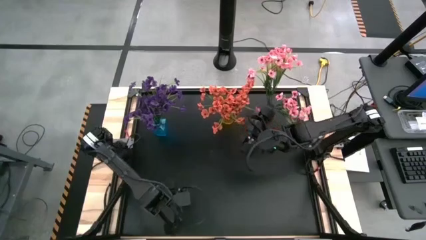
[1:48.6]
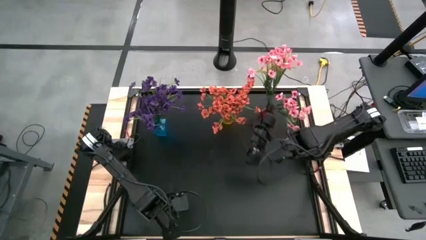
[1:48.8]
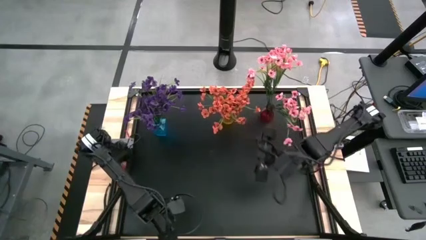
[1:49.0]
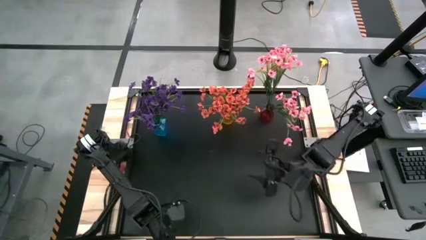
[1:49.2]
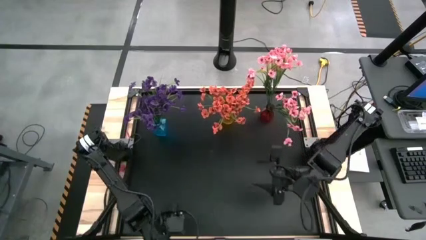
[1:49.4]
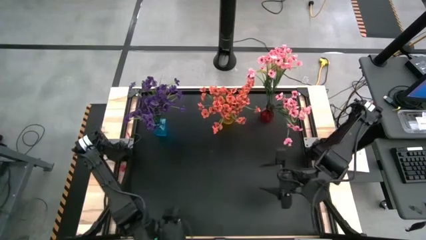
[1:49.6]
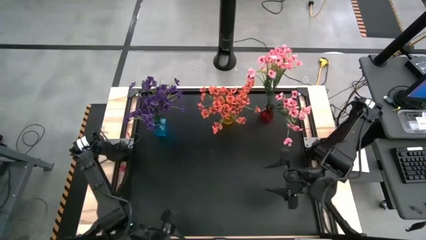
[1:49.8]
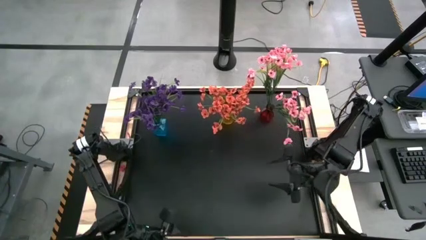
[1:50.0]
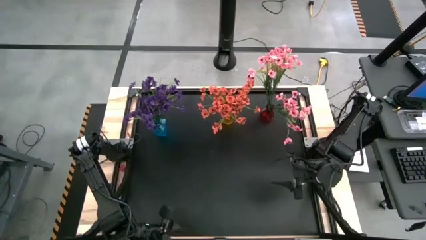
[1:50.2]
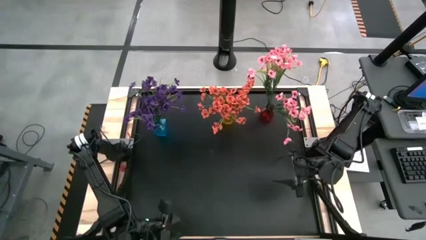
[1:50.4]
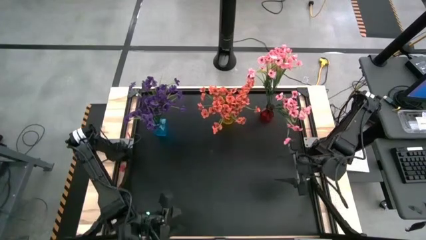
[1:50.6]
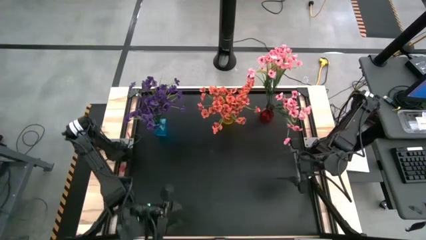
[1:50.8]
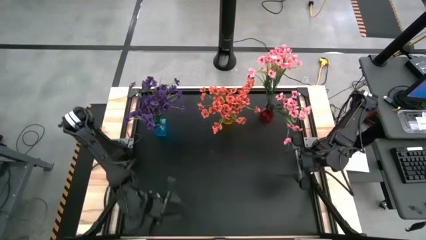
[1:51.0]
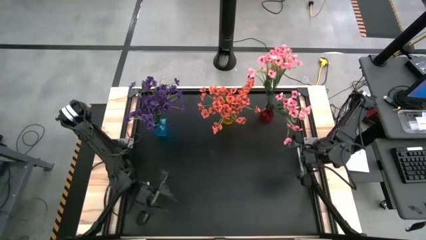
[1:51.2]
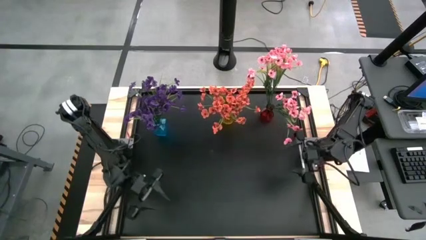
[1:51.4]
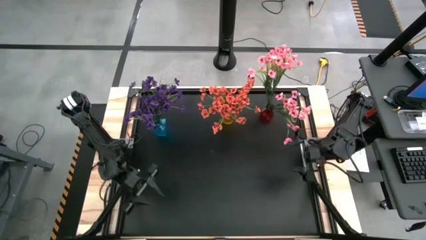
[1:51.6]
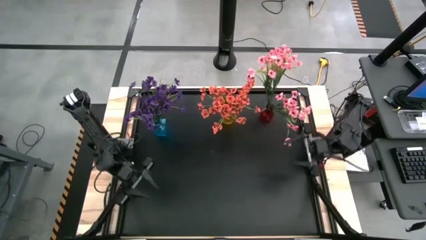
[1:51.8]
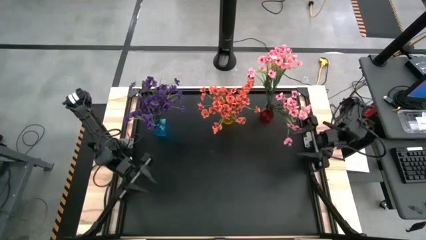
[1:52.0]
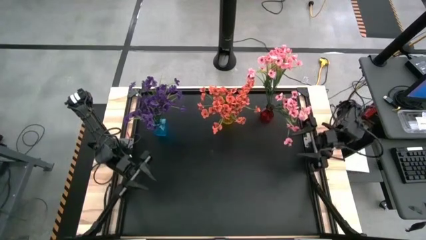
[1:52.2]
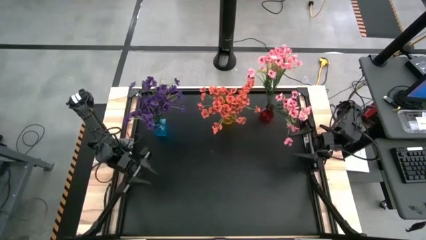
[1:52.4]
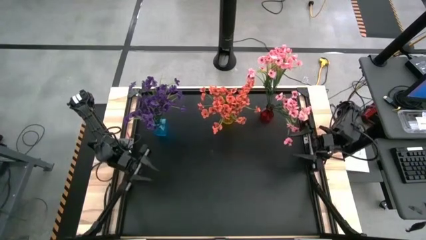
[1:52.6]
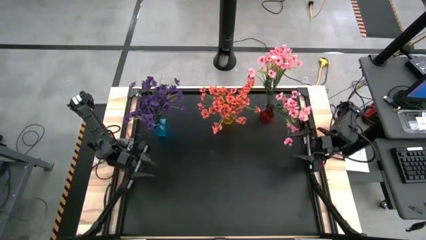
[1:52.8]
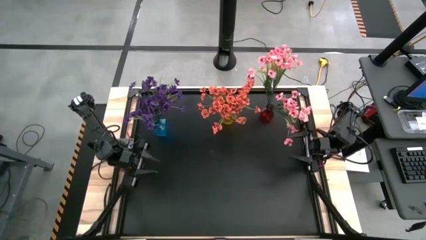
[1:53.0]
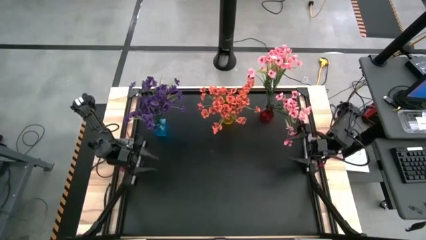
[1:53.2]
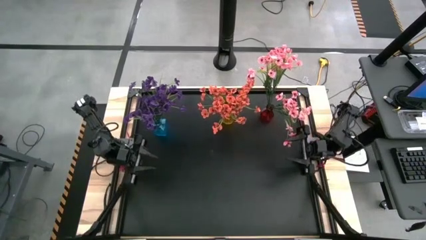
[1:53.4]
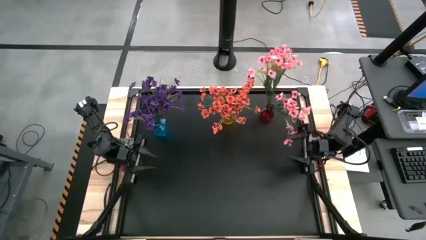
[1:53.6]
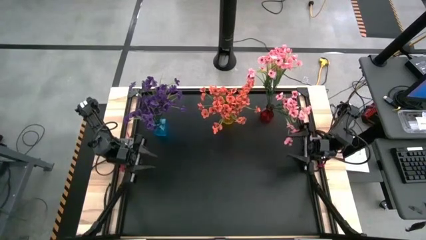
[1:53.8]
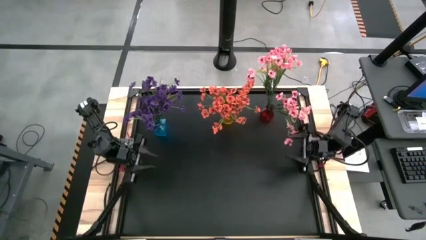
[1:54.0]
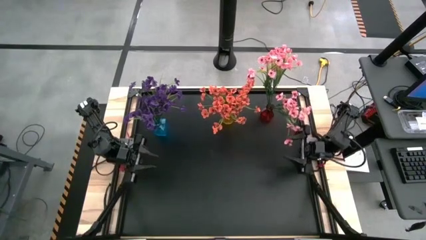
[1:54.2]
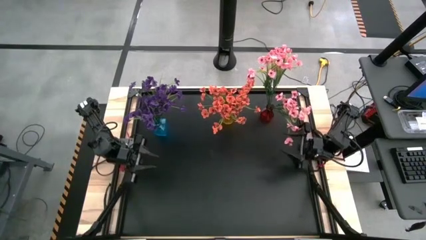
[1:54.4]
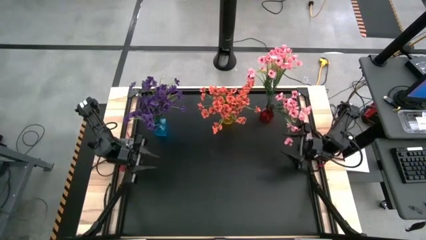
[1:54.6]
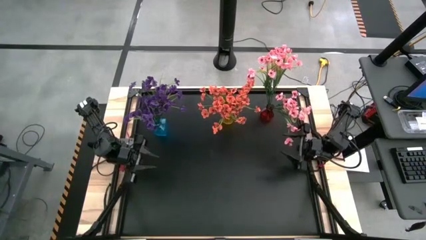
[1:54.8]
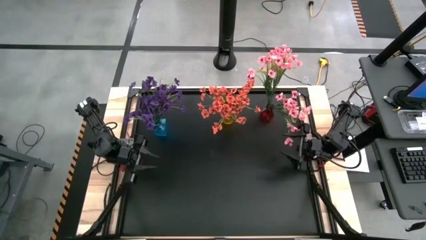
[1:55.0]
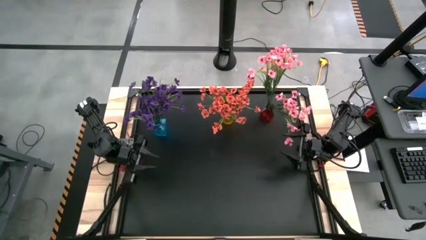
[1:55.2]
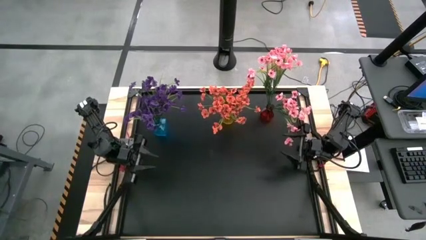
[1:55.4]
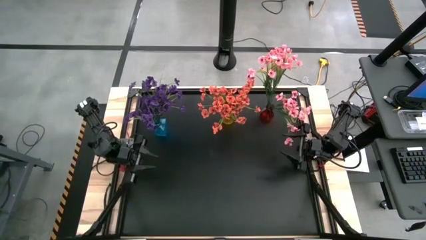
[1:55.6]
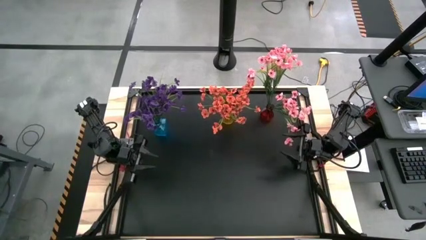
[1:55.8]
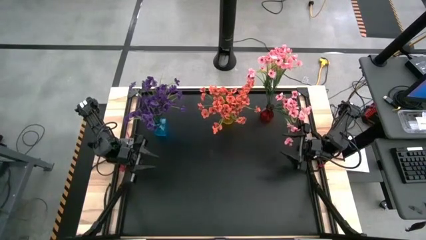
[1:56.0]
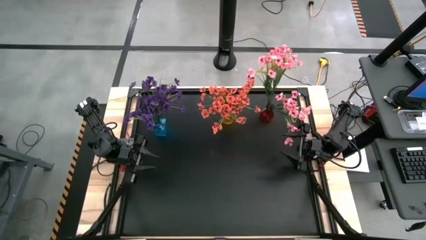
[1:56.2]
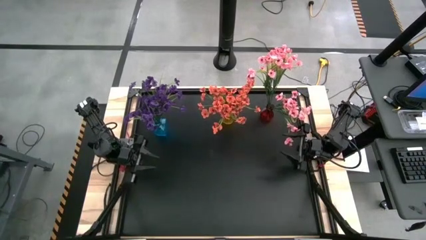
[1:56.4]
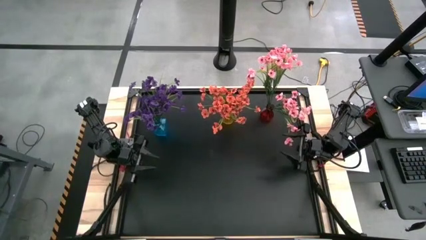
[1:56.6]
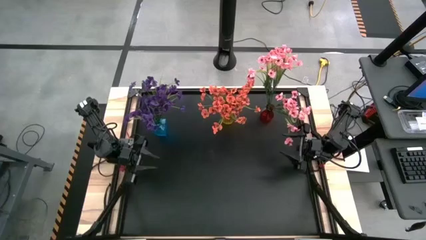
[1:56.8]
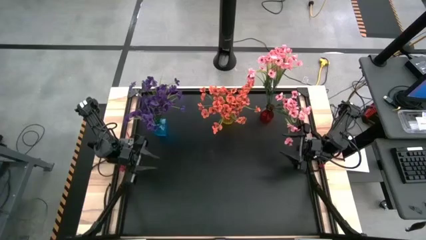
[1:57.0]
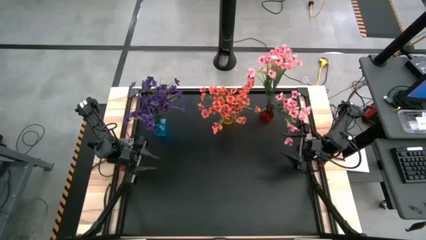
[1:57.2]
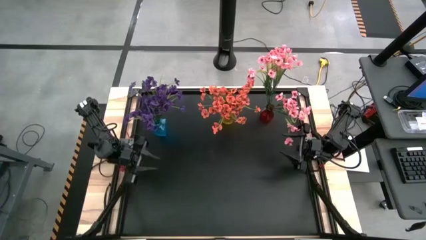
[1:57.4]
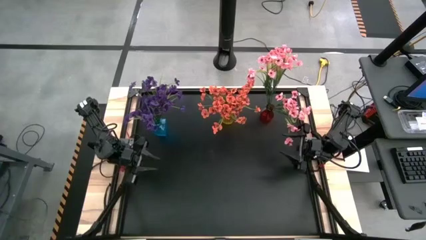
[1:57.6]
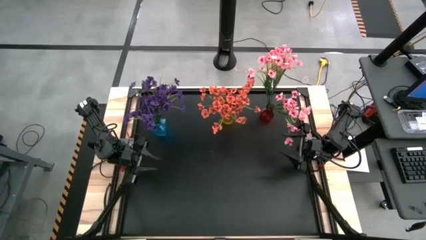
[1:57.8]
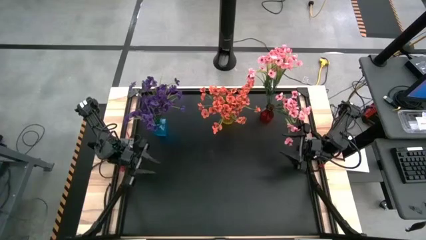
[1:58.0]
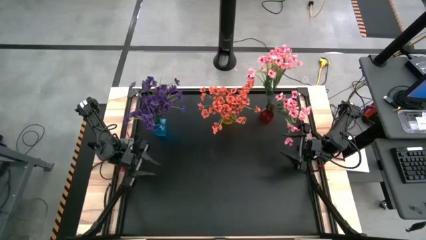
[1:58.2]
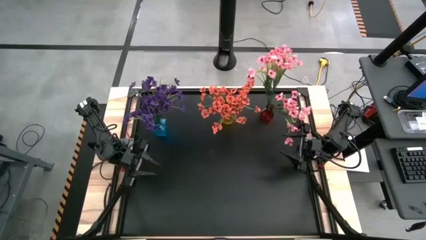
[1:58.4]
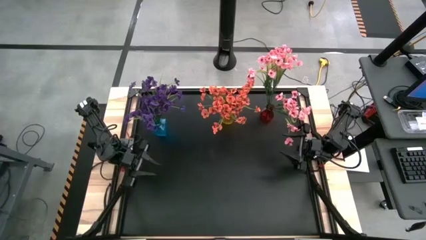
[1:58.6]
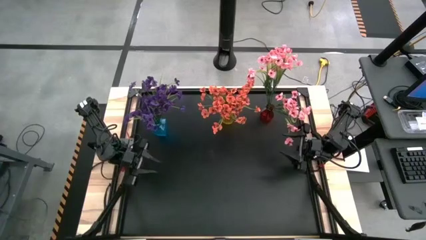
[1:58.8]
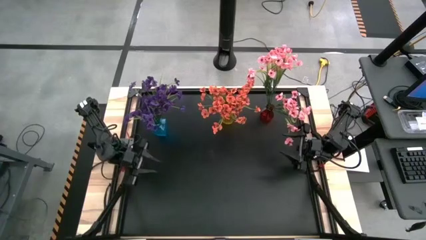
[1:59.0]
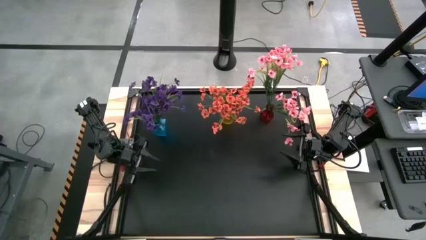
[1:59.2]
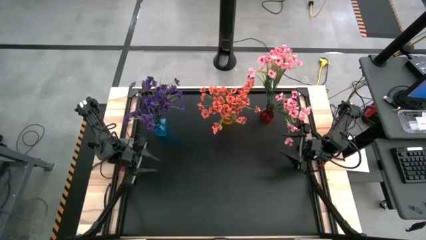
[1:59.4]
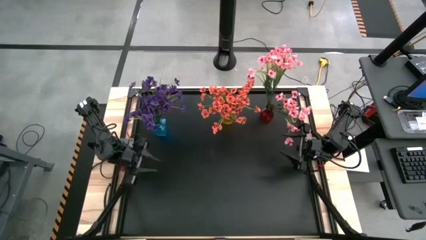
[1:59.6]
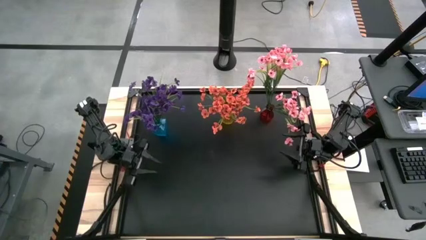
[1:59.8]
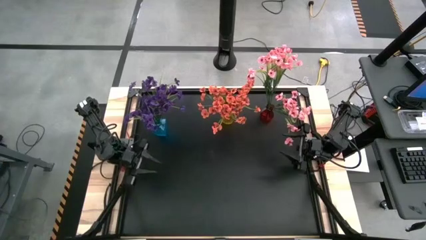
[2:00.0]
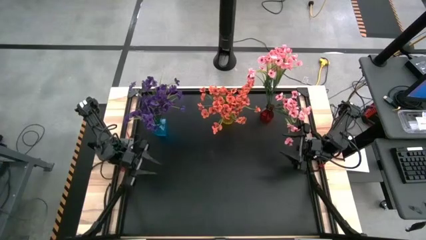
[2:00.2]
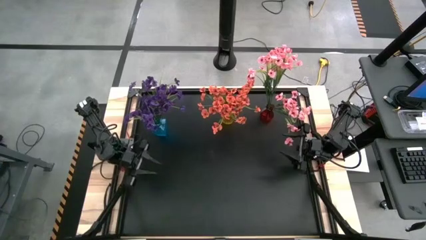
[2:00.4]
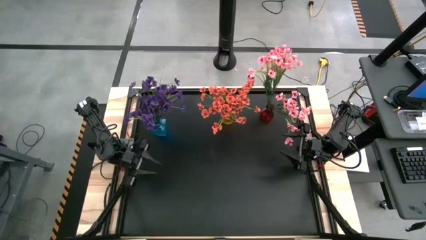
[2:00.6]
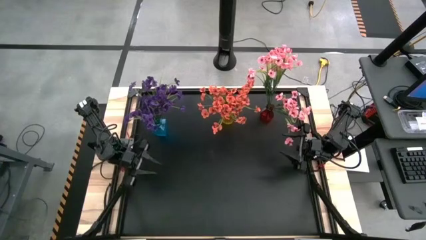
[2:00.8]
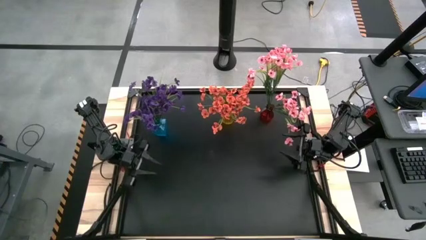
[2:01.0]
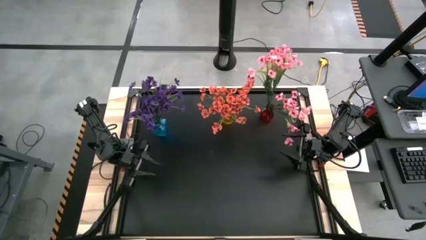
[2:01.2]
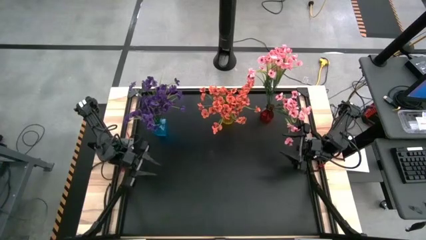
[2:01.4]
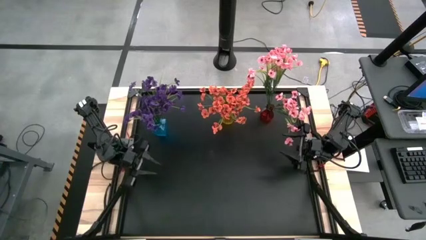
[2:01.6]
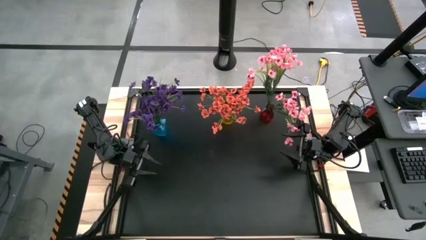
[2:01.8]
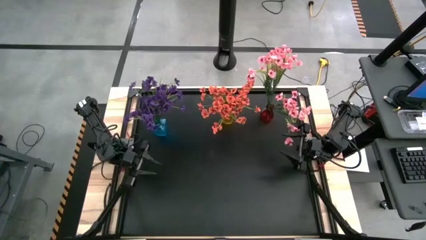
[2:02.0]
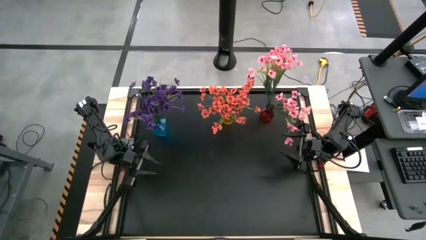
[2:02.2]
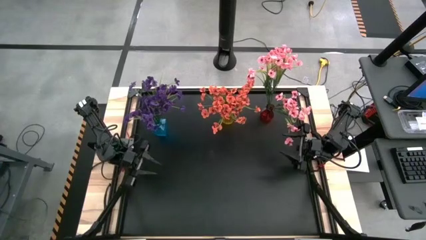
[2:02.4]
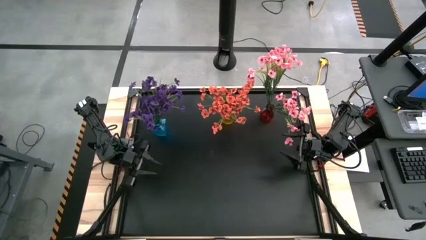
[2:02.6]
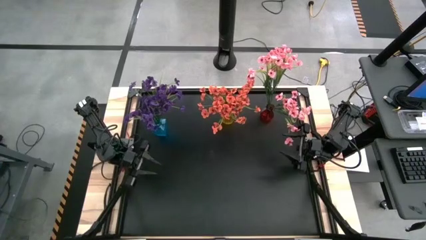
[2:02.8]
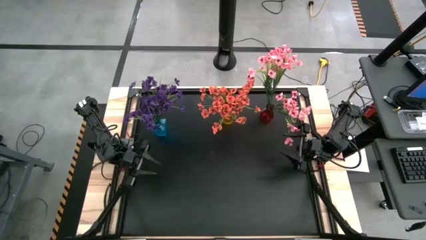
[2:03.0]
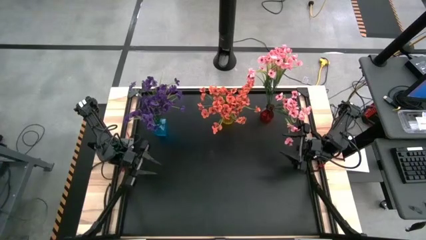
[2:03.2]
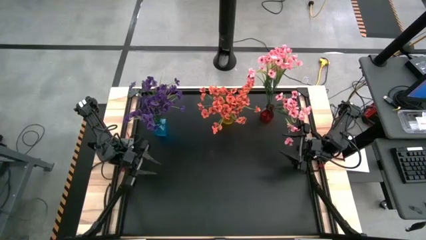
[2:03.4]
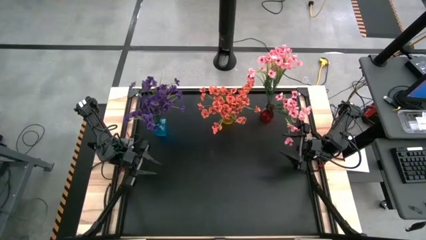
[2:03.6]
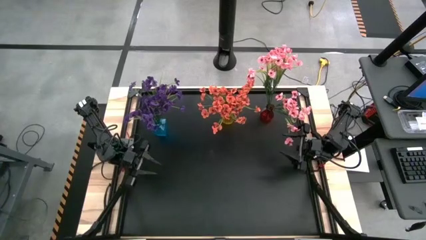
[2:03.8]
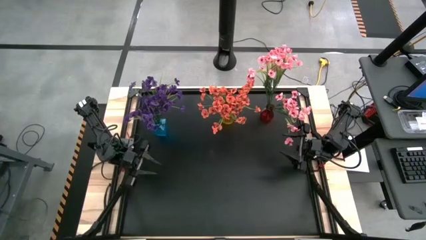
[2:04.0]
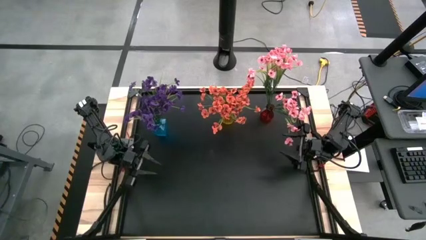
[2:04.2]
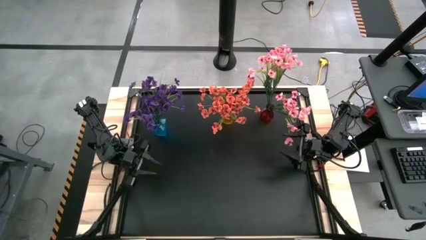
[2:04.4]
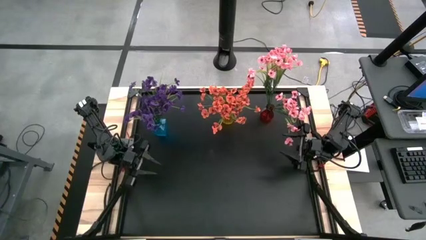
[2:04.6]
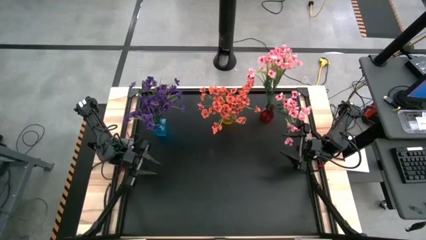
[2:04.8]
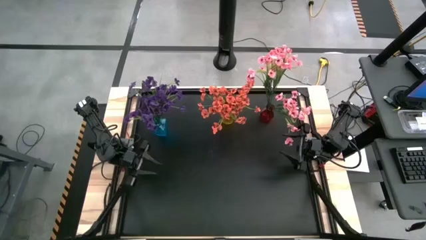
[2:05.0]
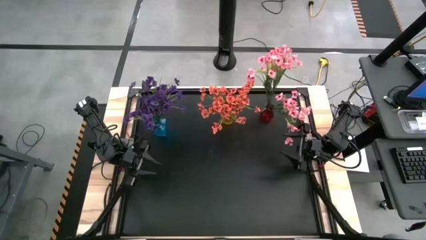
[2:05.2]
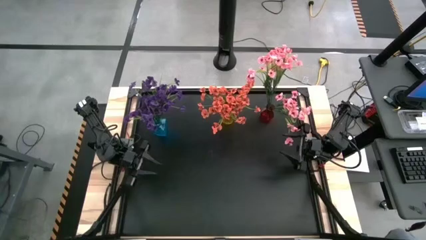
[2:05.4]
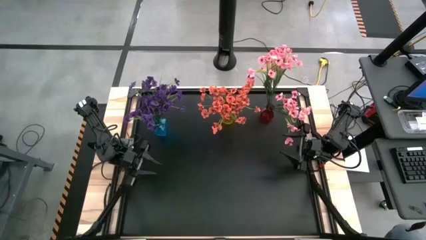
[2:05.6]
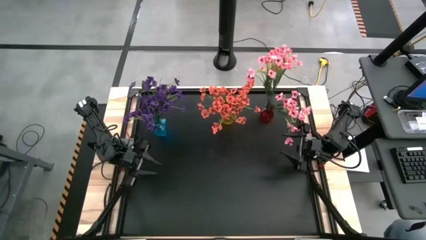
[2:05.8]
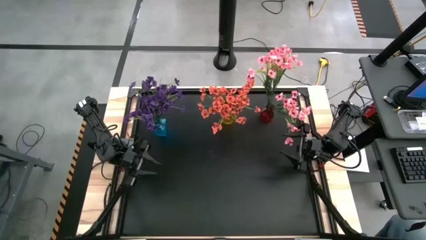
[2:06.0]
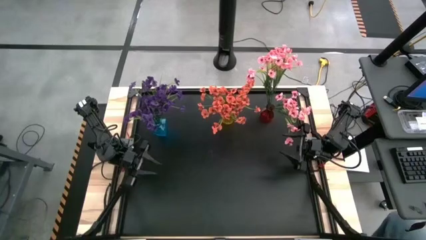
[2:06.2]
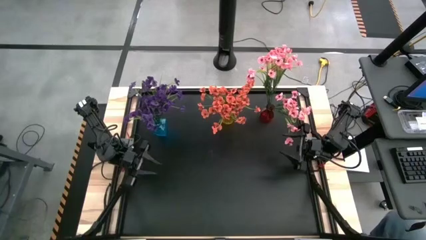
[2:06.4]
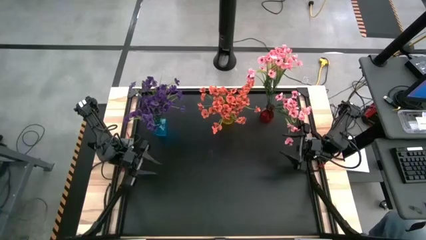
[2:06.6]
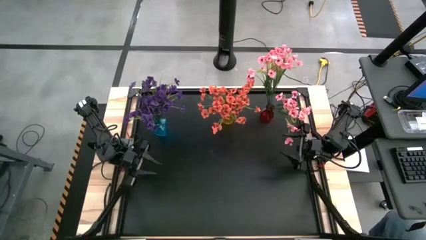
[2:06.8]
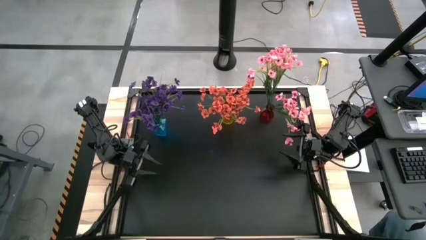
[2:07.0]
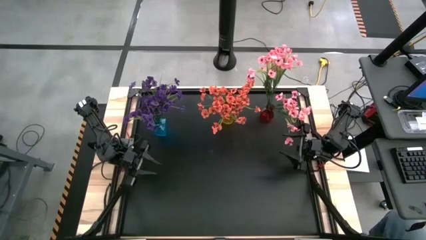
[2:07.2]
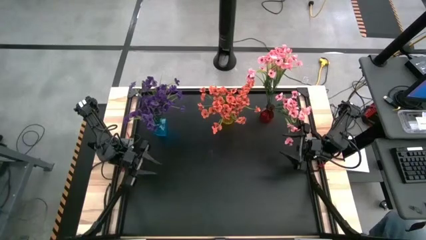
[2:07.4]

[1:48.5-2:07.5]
Task: Sort flowers into vase by color
Return to Home Position
